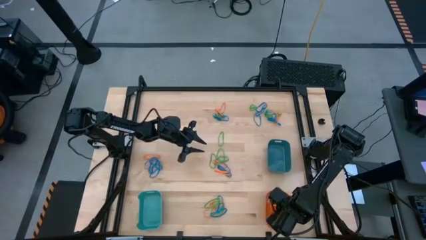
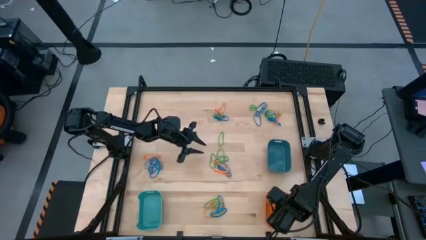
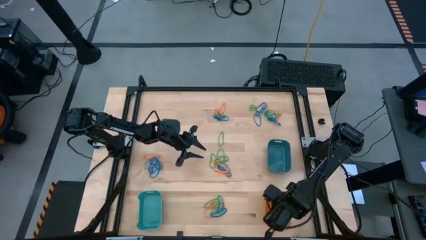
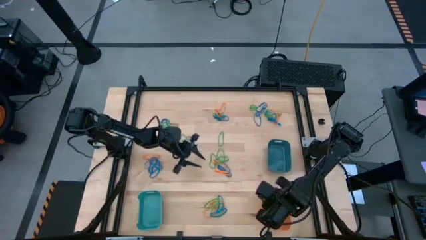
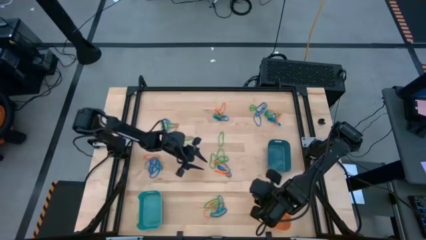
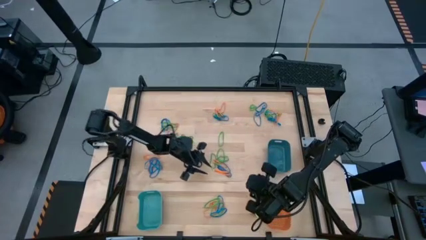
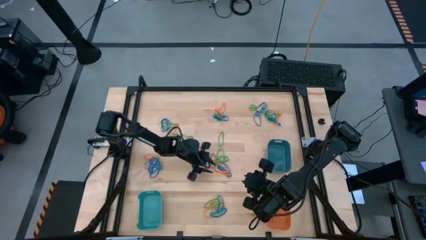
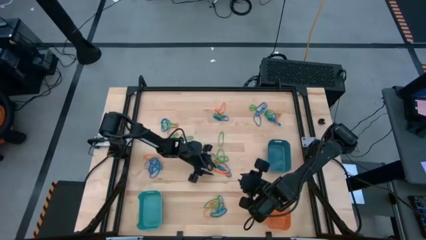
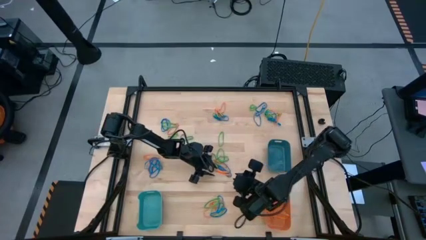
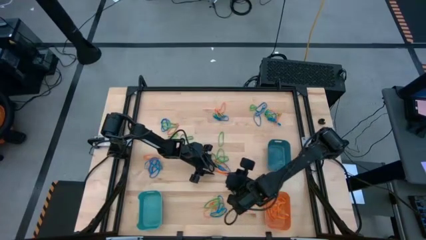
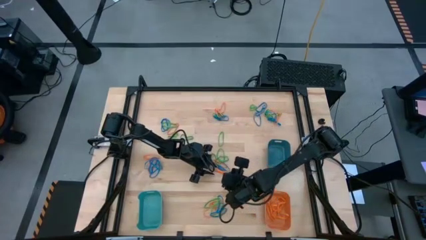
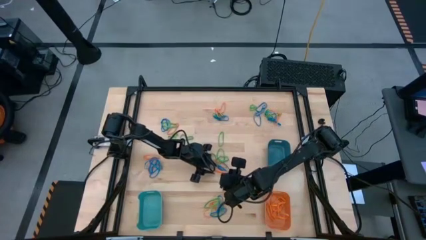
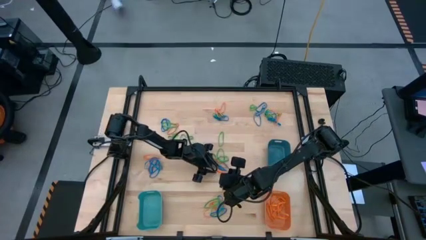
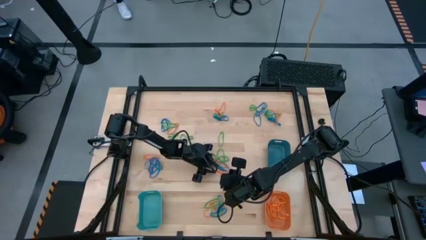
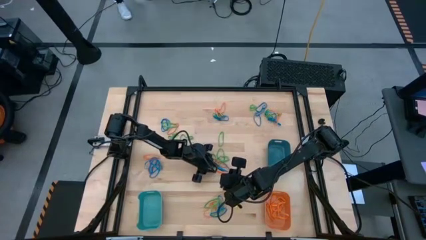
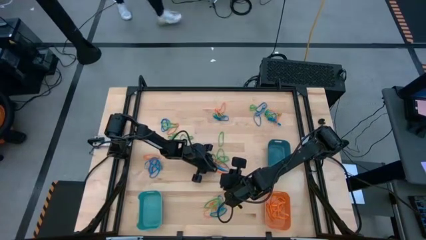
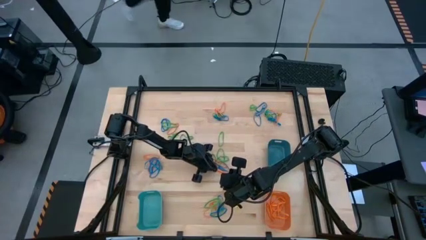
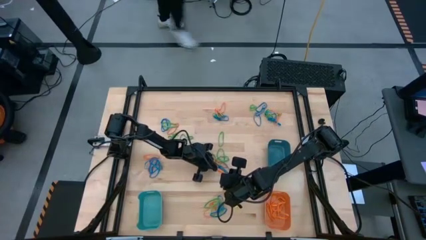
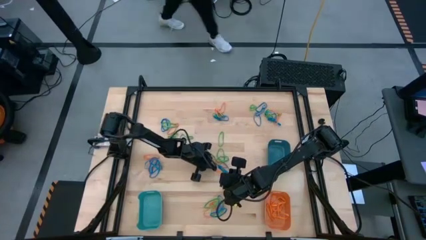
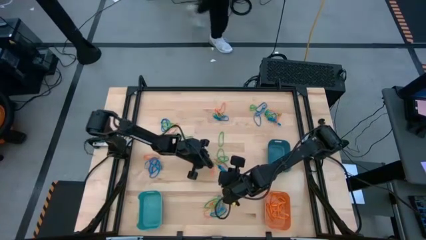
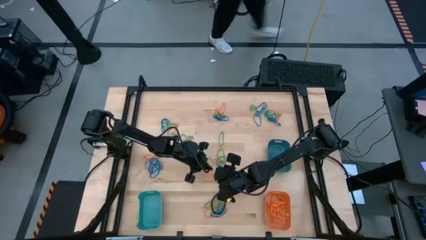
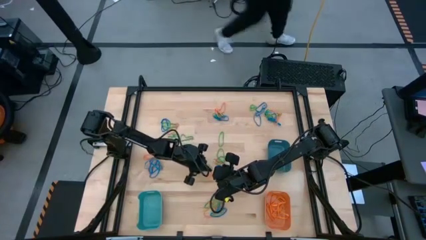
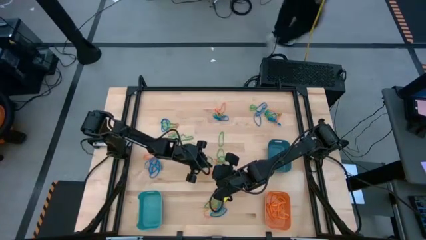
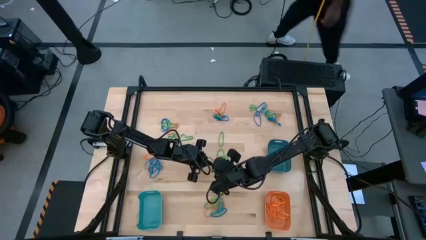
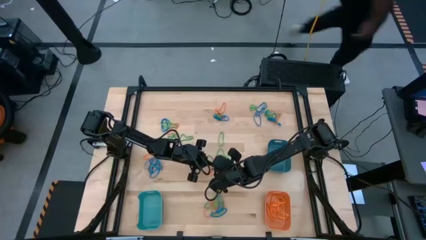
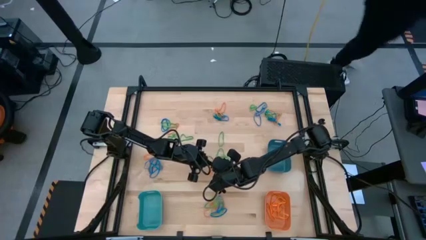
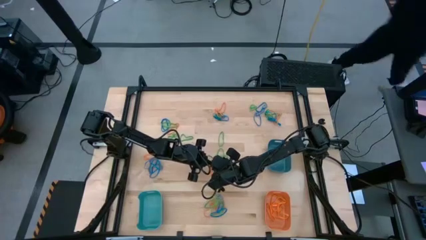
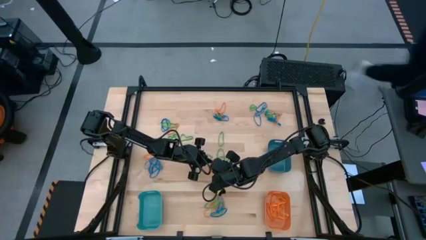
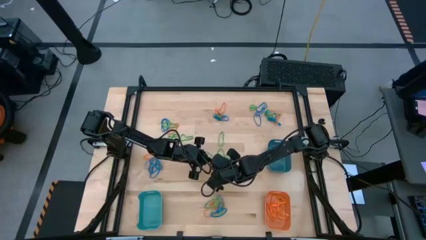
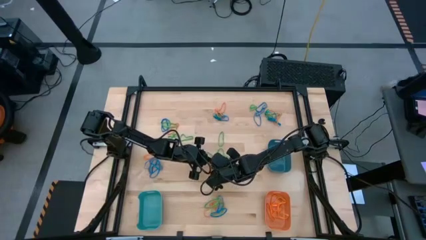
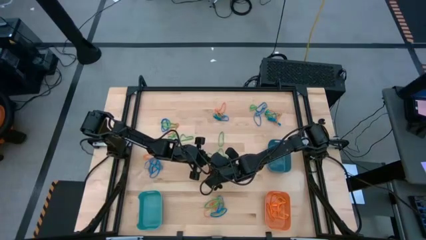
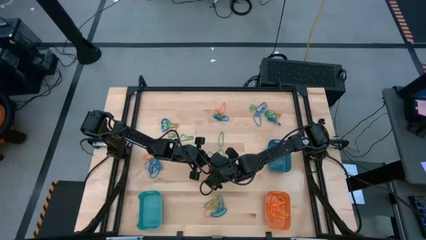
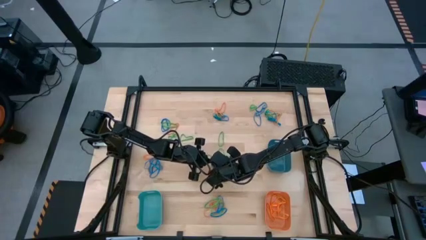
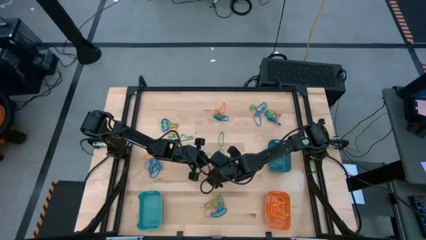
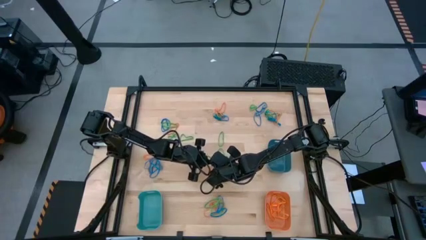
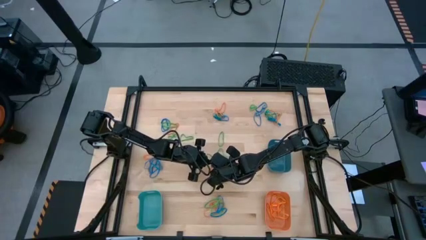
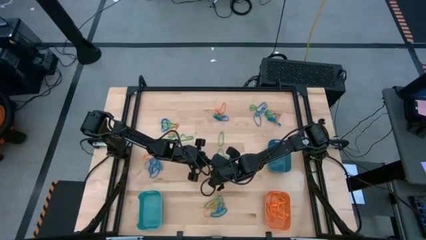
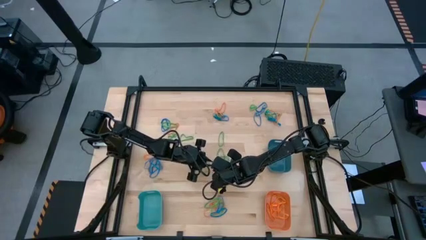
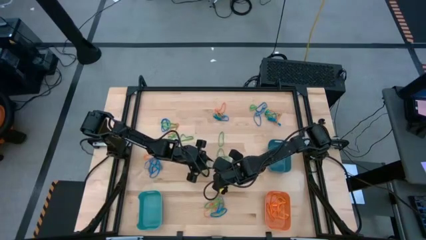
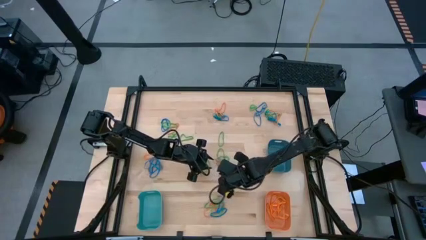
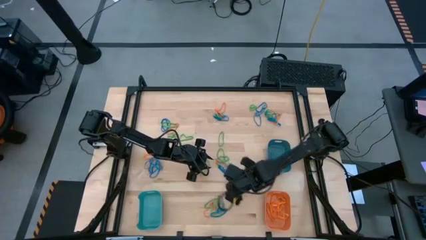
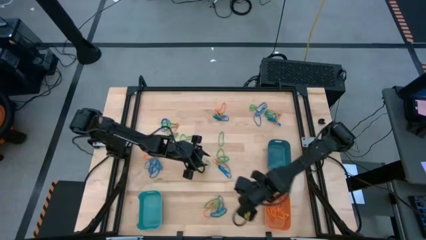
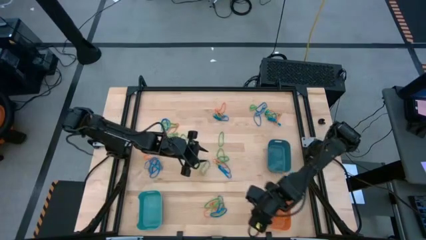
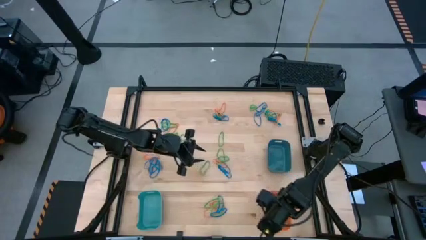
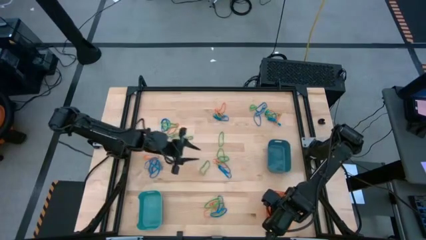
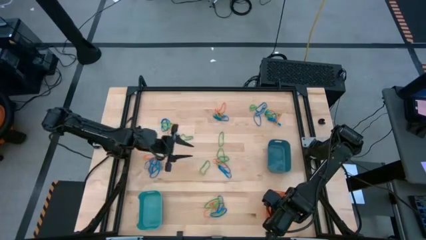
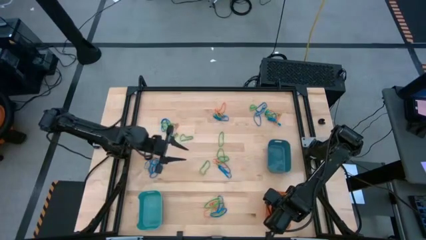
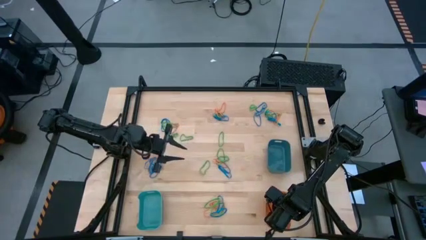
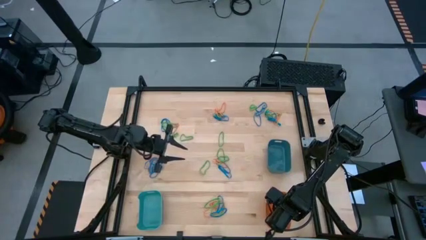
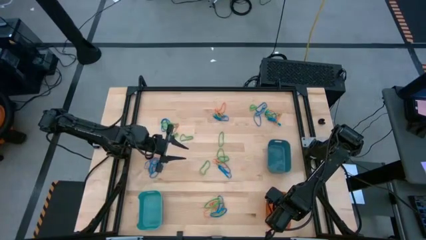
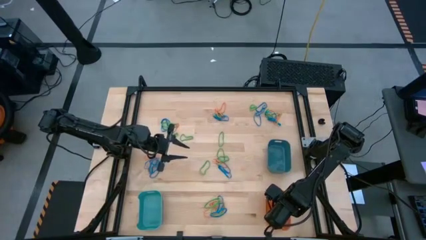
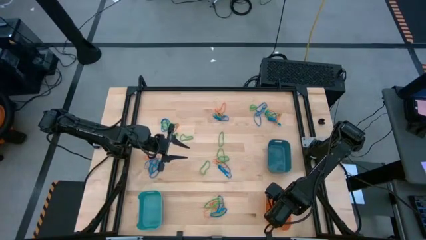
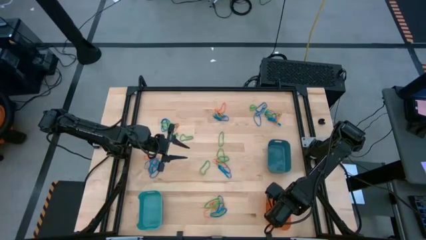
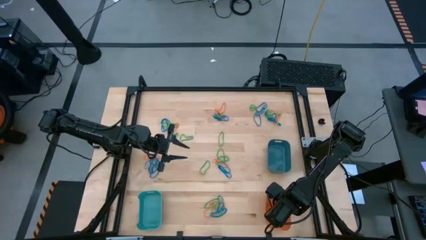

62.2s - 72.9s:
Task: Sort rubber bands into baskets
Put the orange rubber band into the orange bin

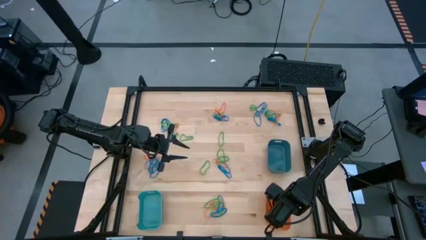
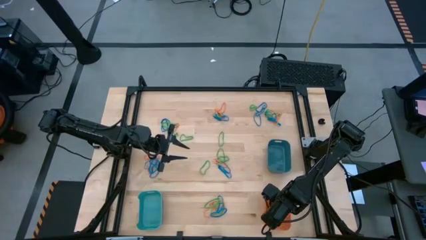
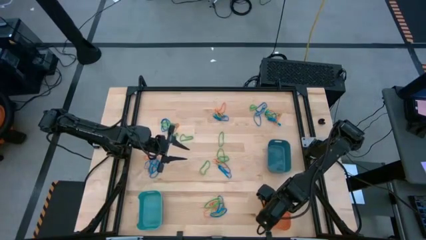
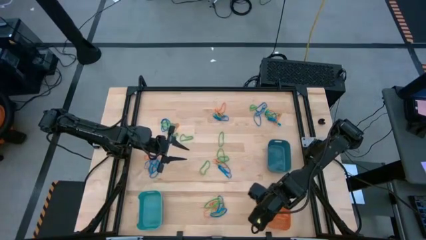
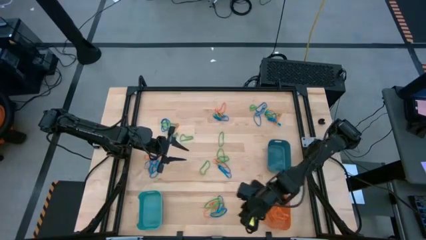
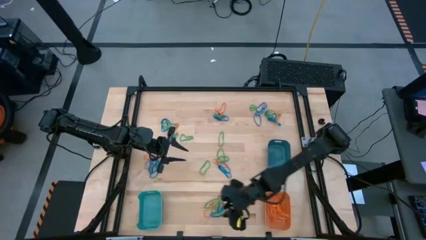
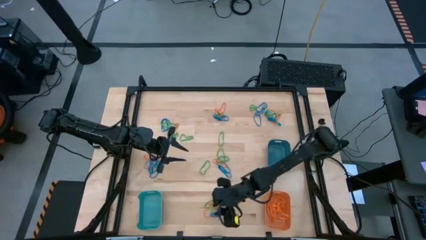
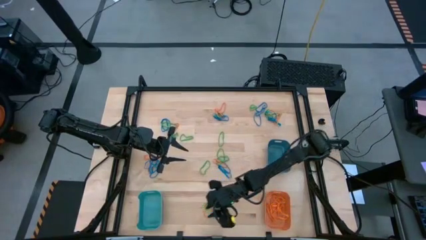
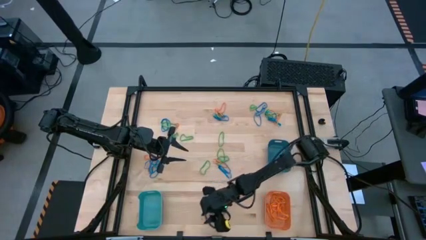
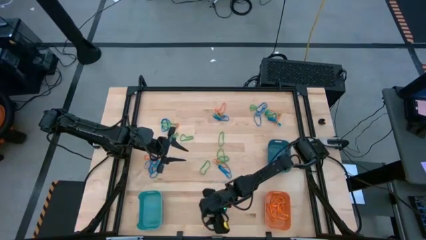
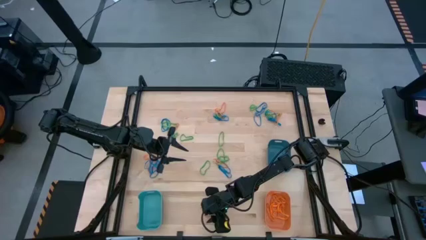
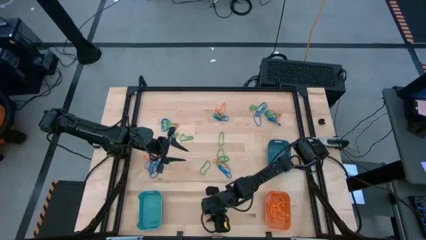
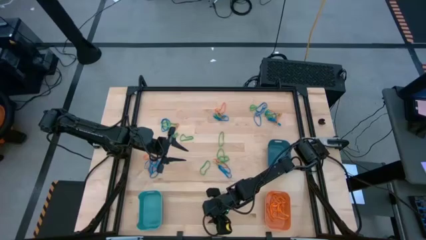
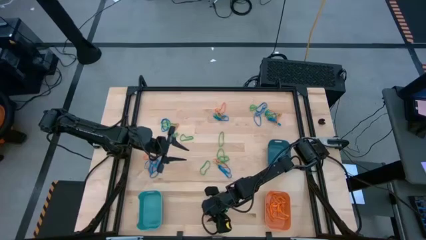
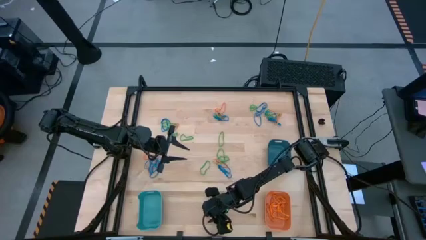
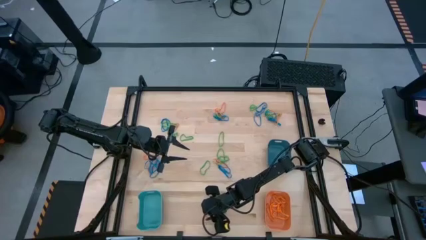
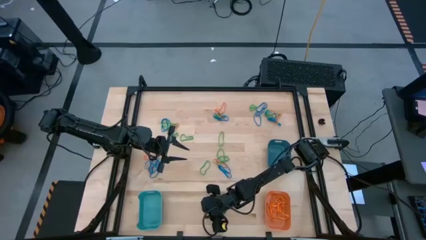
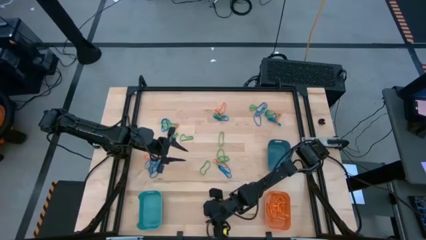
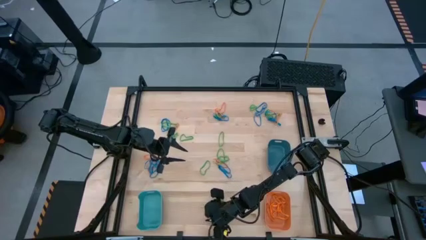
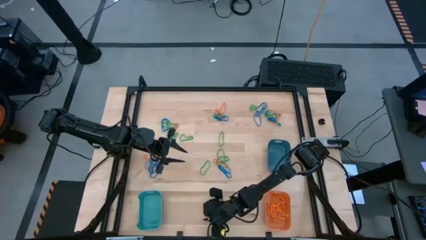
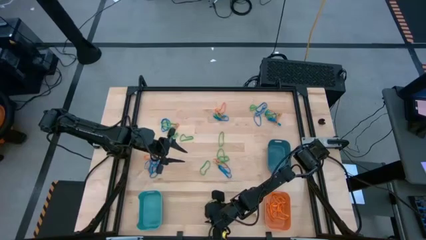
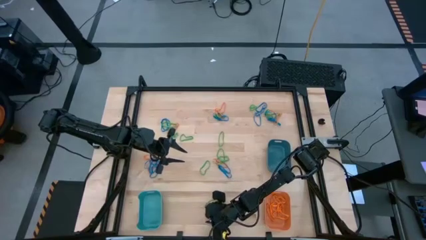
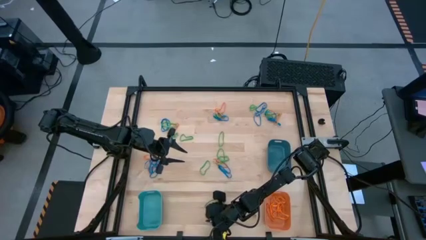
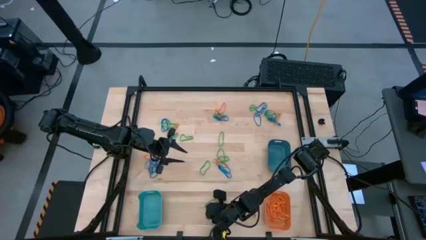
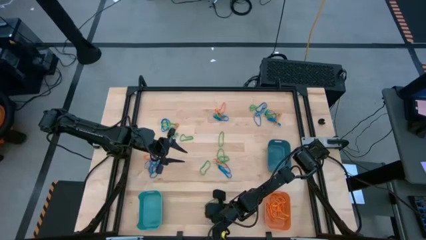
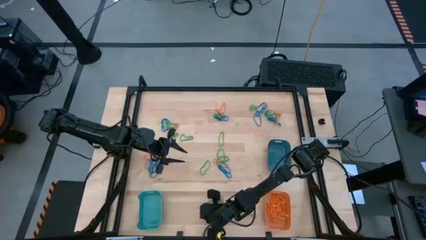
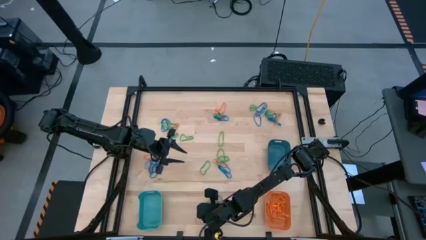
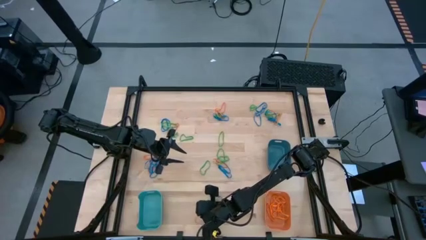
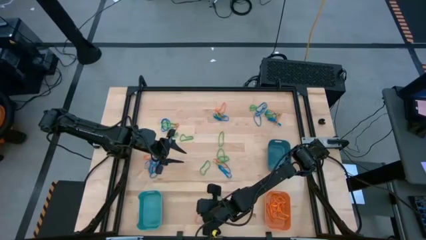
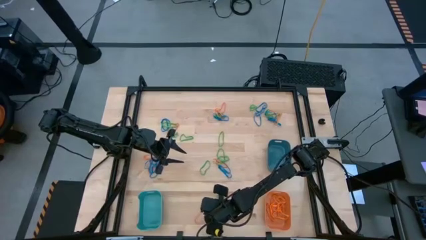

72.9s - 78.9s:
Put the orange rubber band into the orange bin

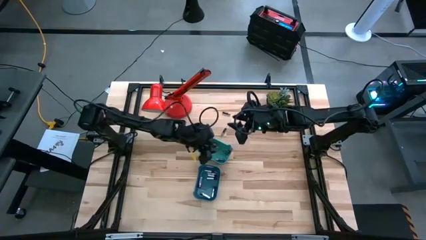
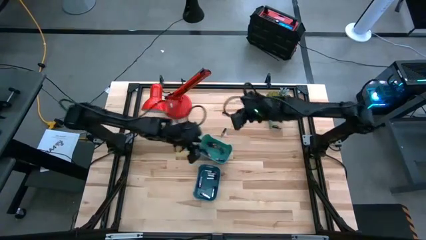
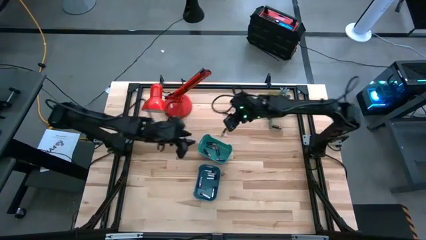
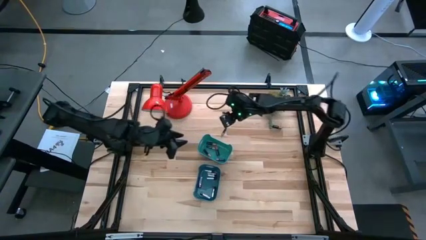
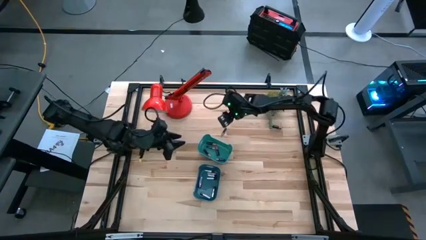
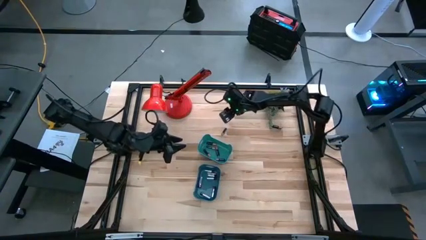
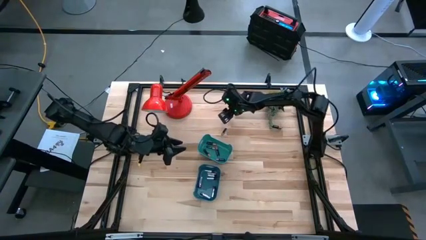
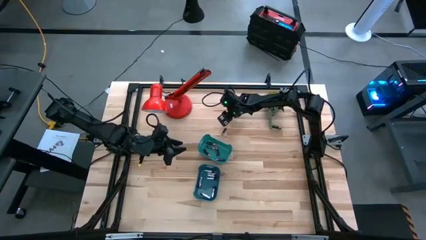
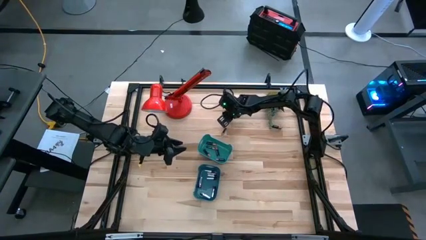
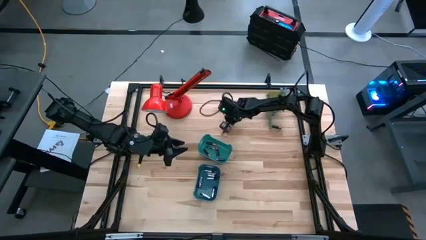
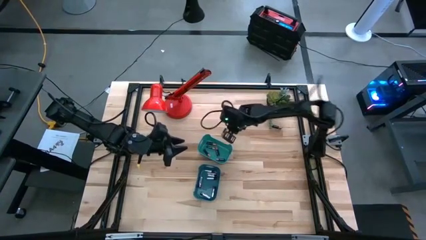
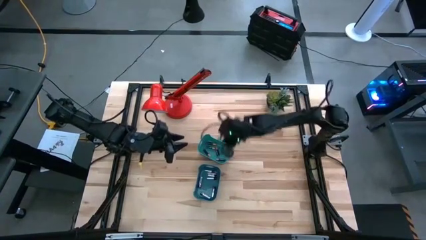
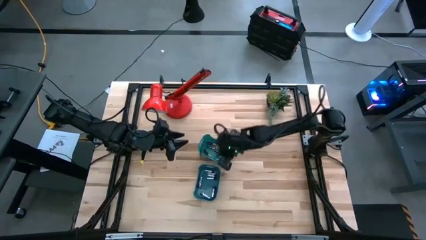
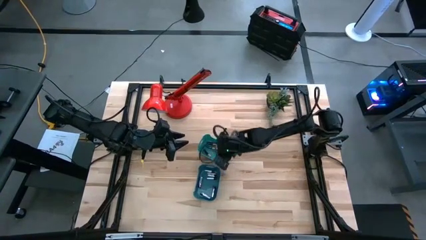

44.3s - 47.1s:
Task: Sort batteries
Put the black battery into the light blue bin
